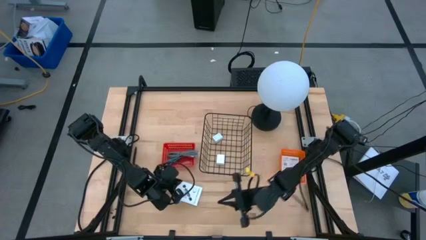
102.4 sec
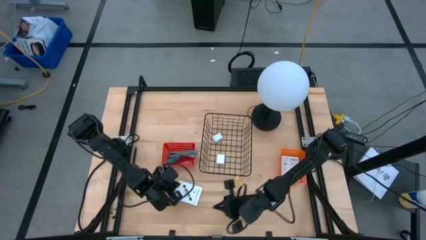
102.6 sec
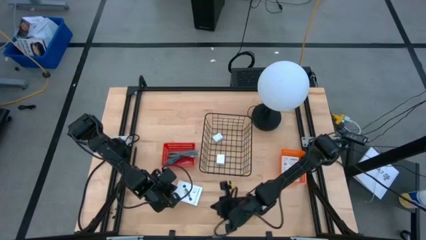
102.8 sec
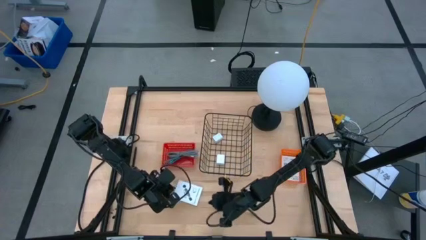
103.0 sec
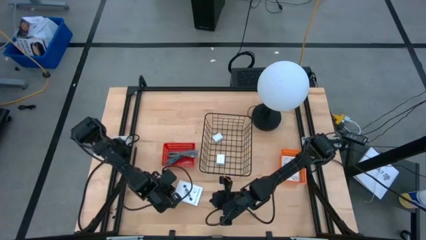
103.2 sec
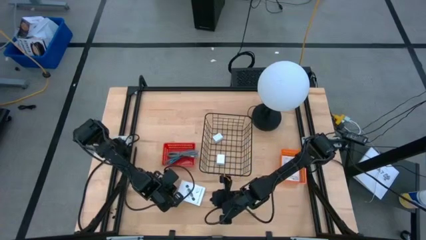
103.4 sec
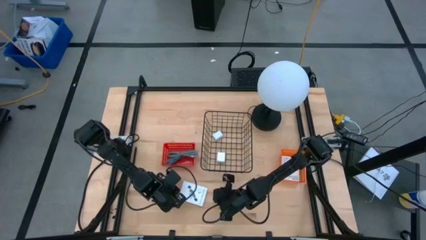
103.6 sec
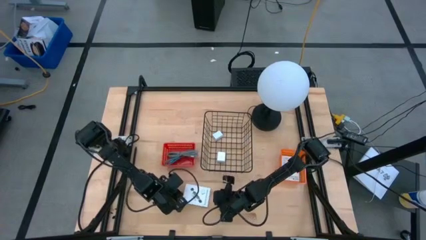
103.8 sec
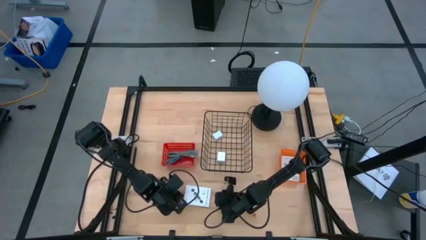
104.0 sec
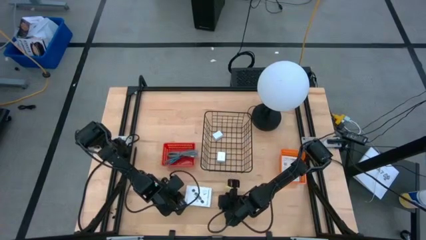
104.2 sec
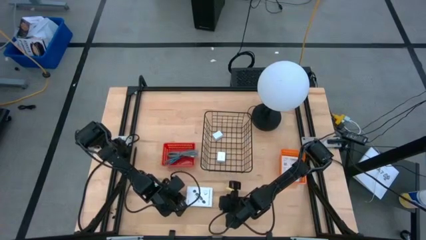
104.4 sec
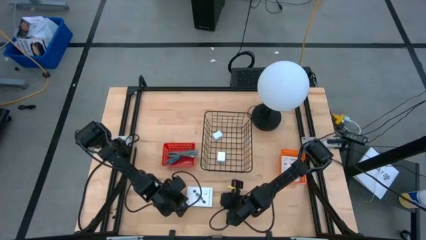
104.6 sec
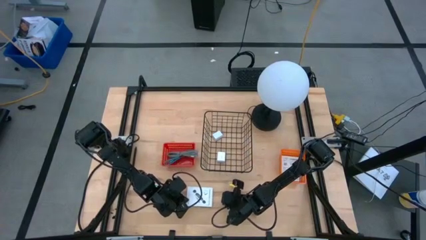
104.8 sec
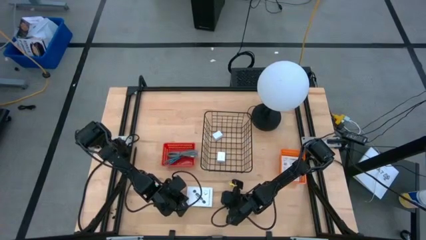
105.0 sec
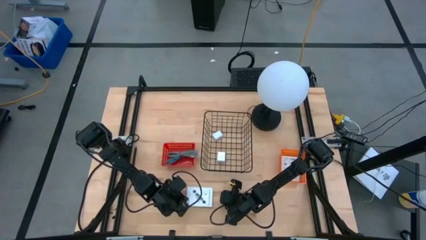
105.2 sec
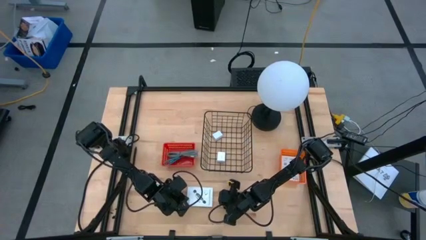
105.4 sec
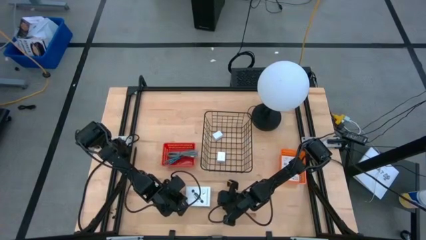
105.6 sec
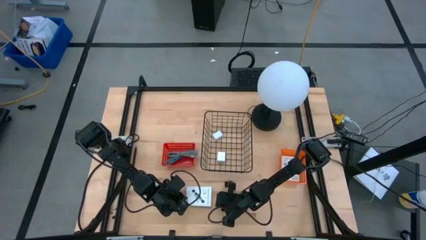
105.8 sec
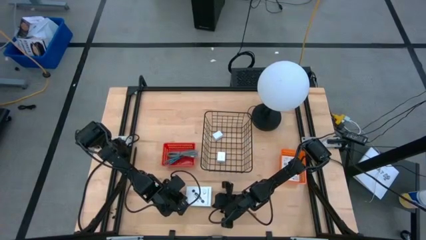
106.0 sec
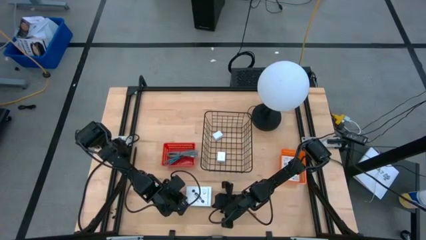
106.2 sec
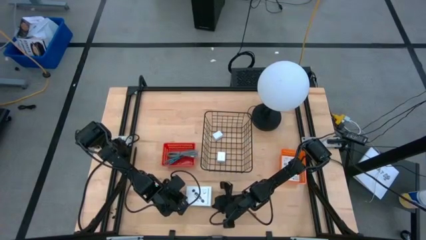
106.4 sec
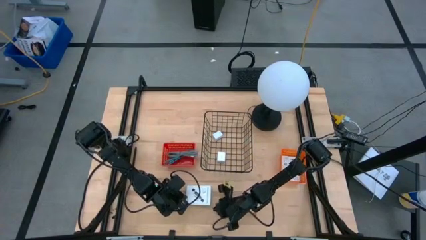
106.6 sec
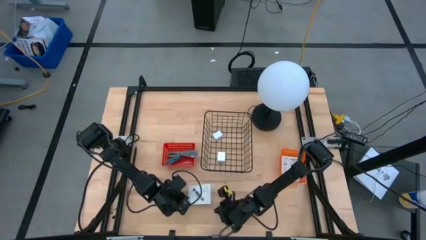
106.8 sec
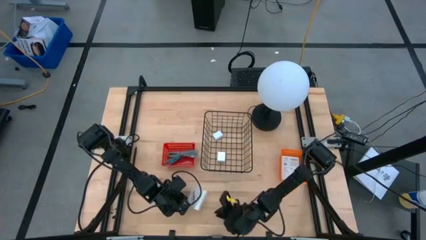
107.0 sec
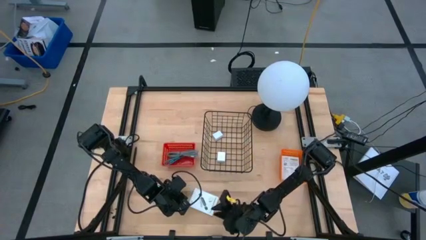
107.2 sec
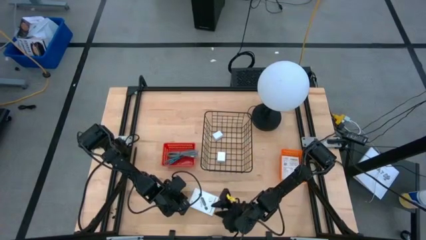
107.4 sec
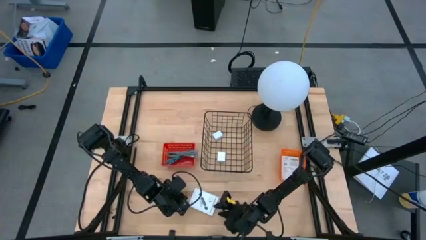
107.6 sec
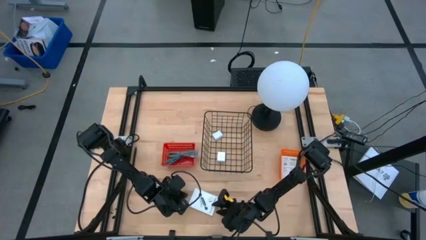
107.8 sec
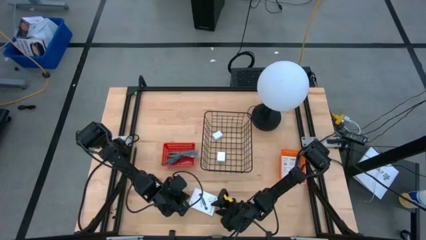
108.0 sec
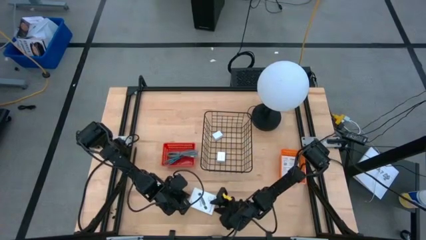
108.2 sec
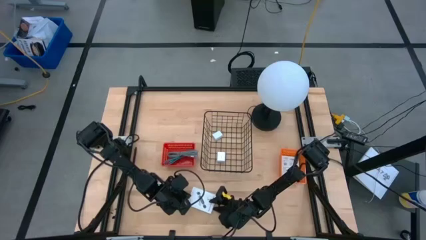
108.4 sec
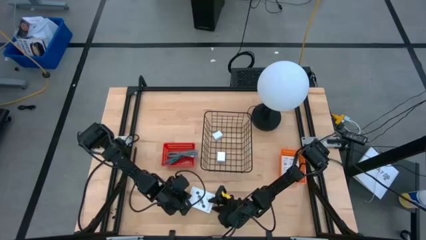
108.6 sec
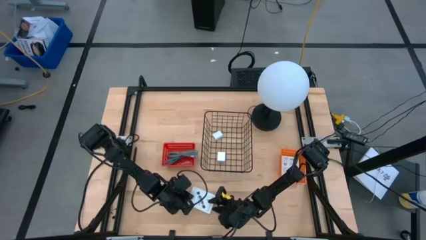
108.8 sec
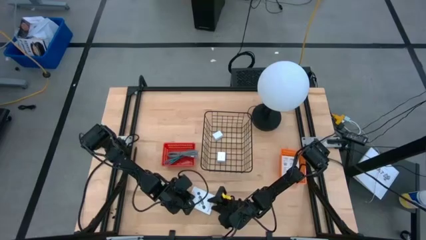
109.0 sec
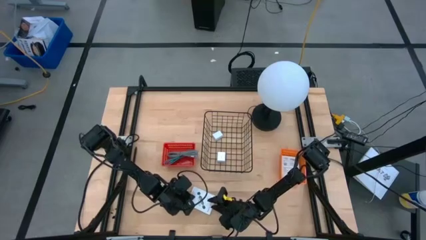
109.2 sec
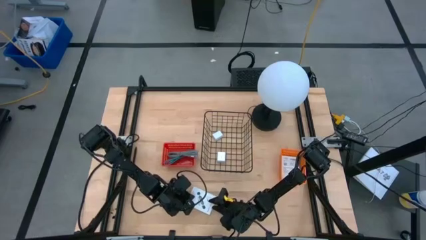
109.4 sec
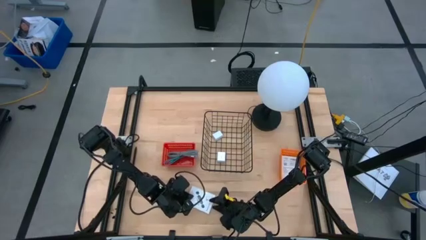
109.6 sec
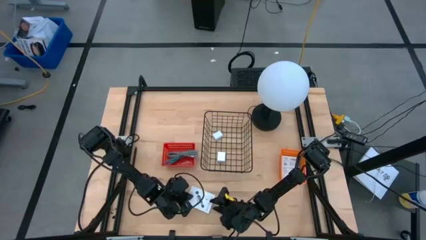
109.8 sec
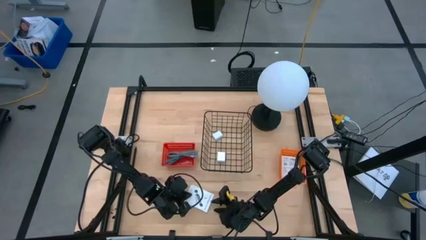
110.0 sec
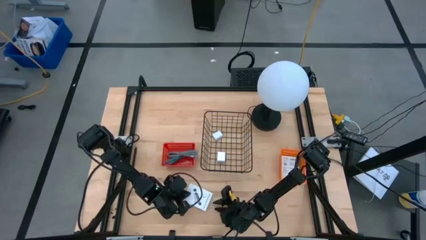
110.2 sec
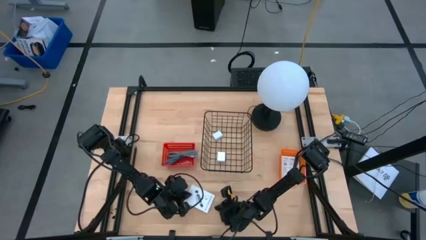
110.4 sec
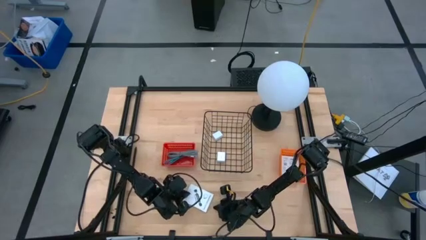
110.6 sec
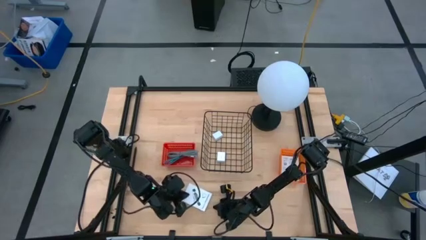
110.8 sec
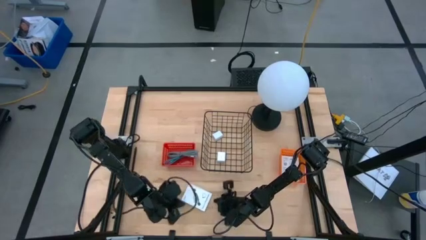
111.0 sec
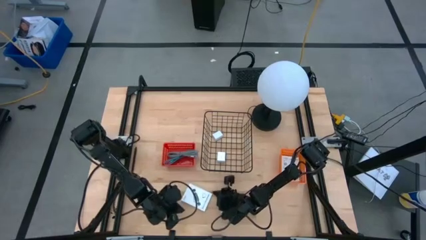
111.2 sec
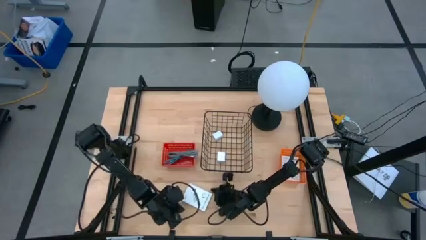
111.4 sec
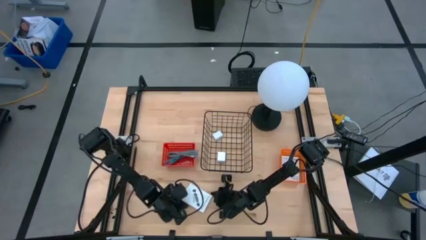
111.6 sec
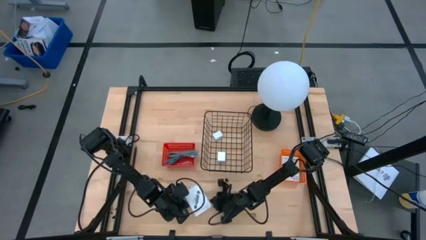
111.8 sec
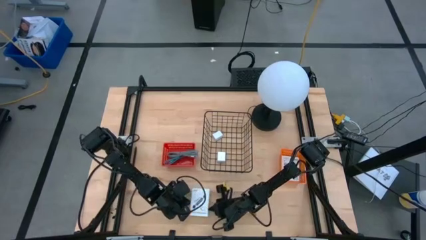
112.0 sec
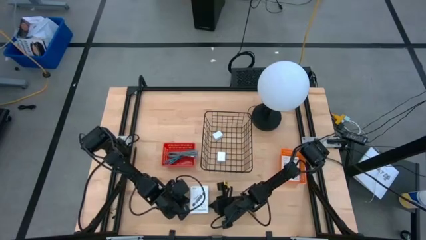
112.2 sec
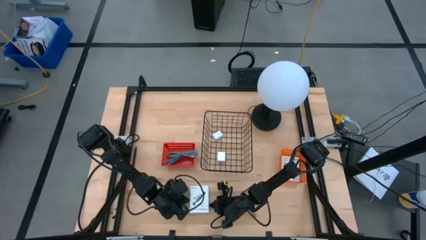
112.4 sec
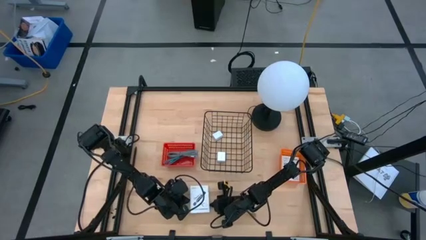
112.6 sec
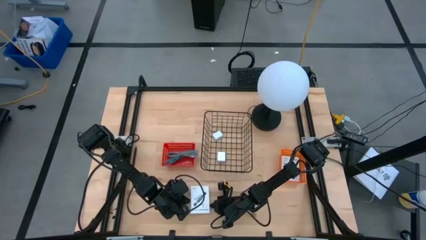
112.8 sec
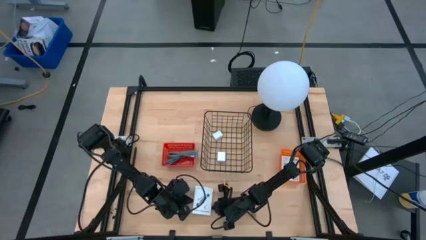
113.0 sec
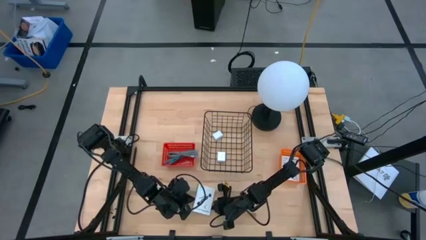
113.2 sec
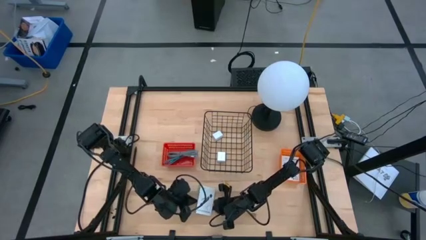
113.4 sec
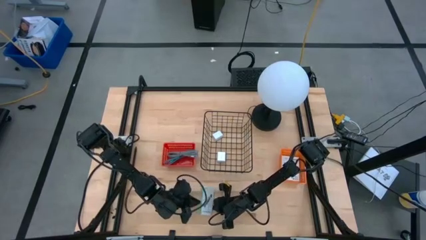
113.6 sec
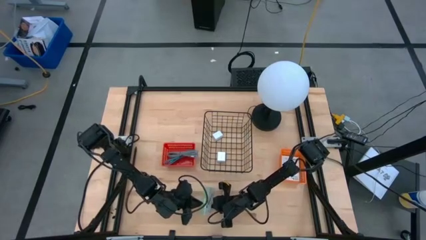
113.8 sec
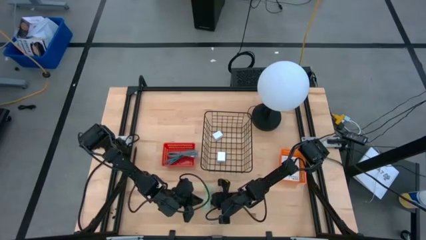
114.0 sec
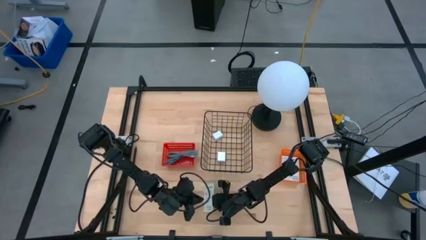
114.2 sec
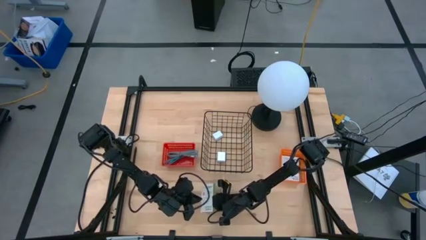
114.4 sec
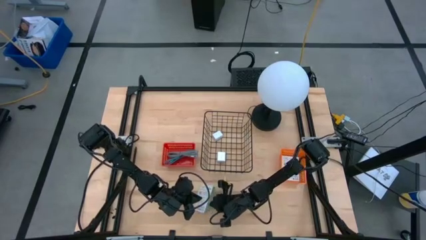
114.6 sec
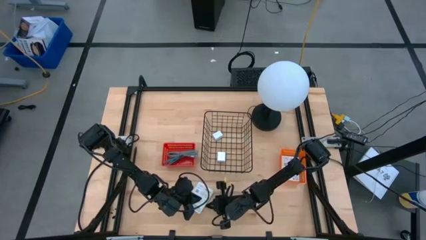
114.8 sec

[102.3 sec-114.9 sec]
Task: Pick and place items into bin
Put the card reader box into the orange basket
